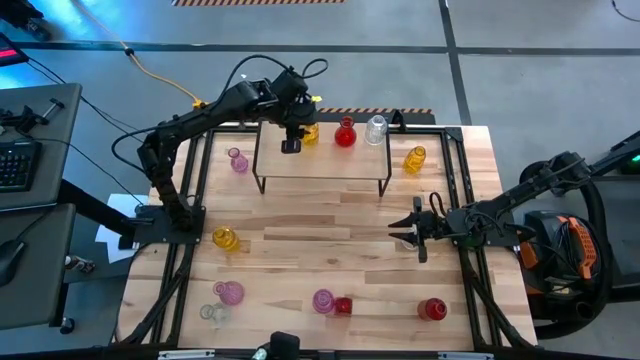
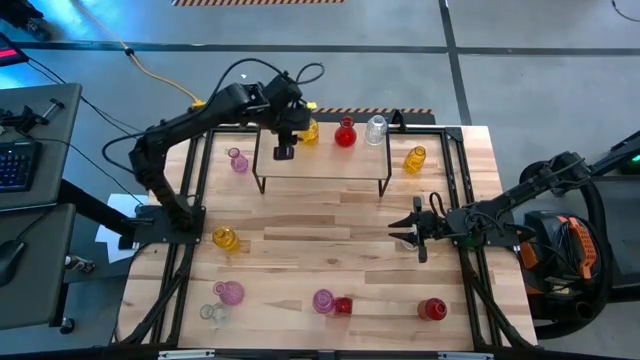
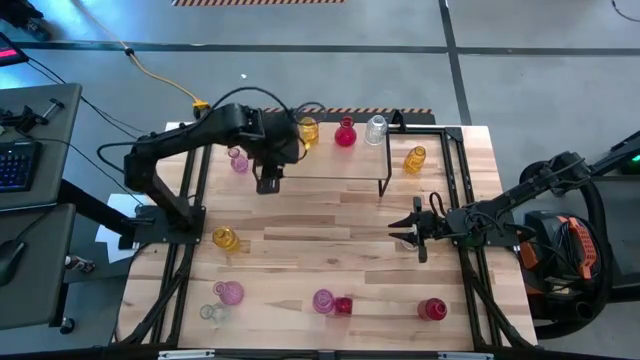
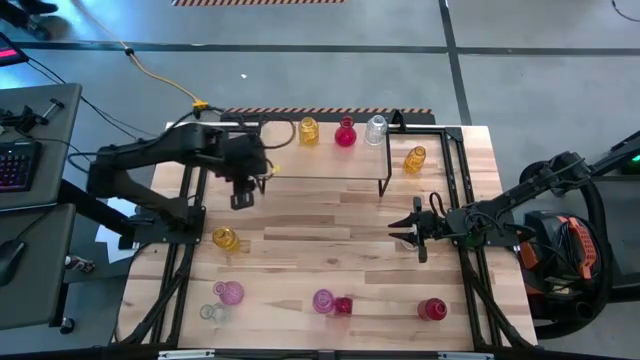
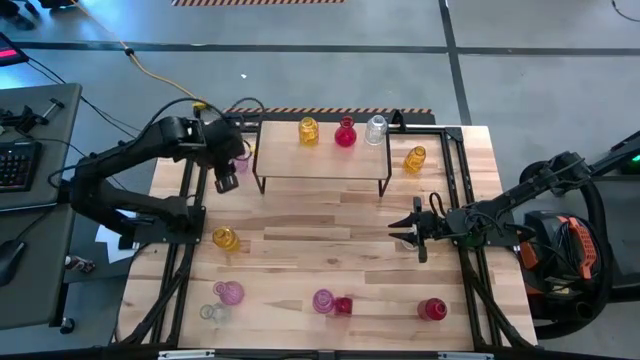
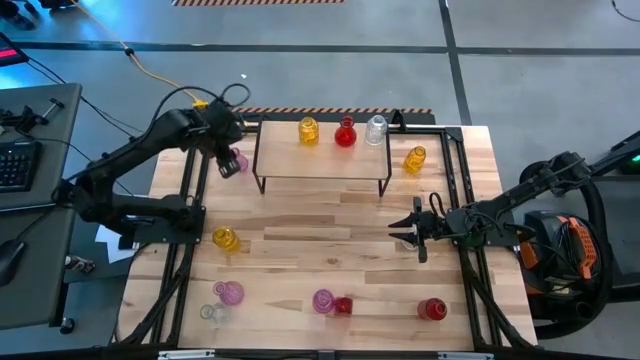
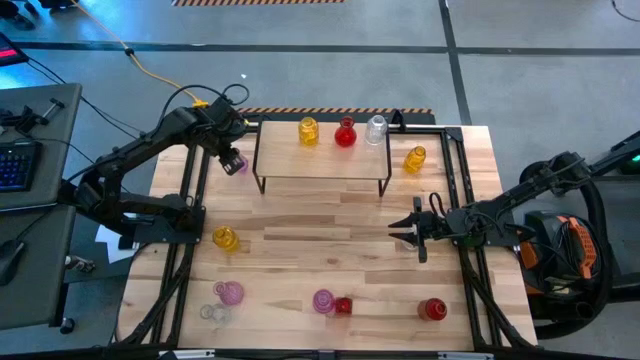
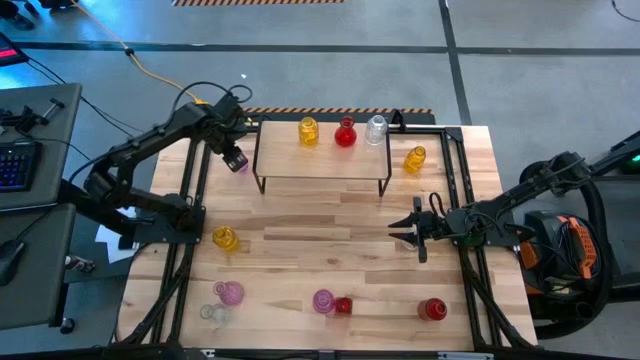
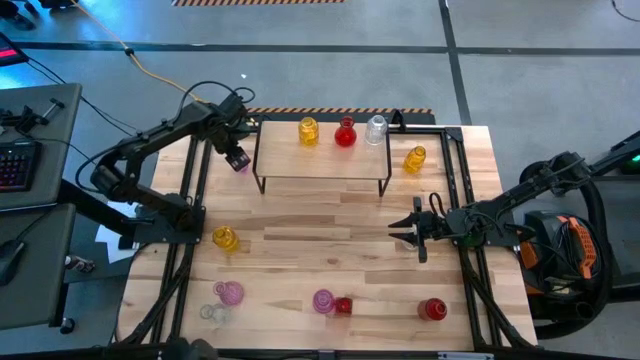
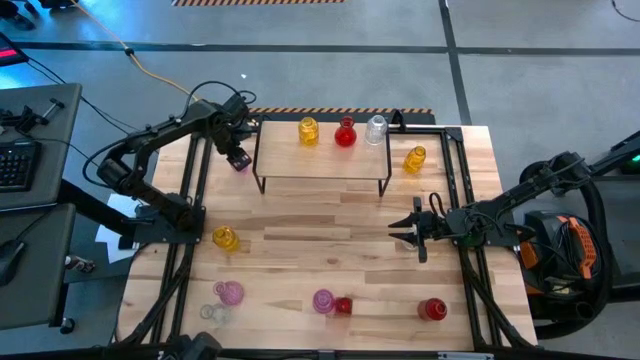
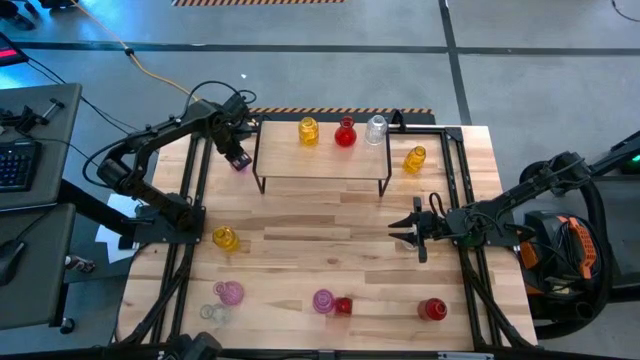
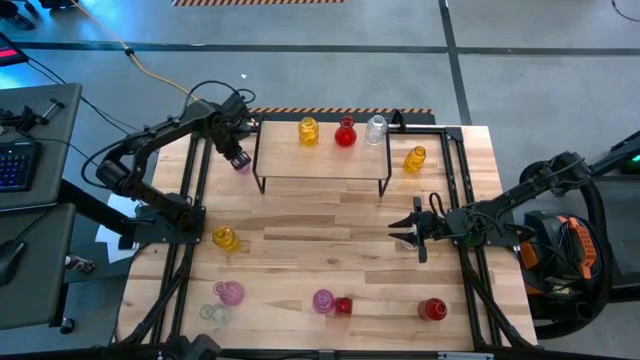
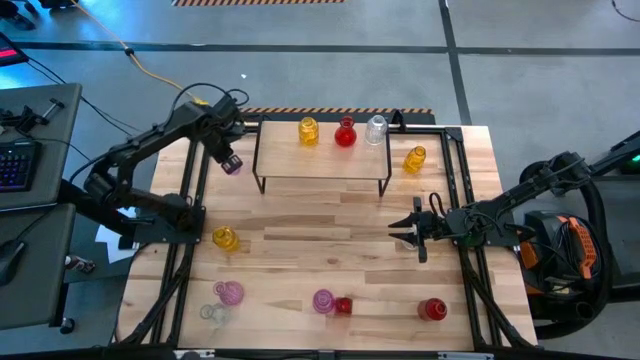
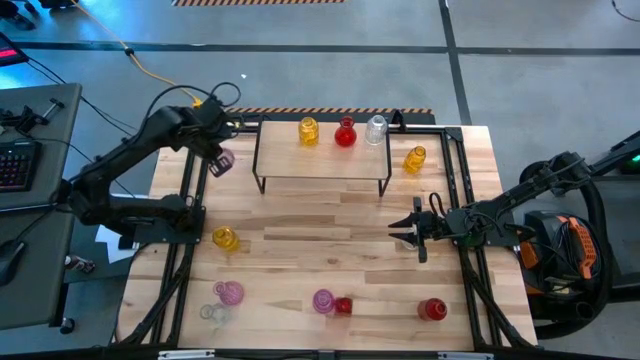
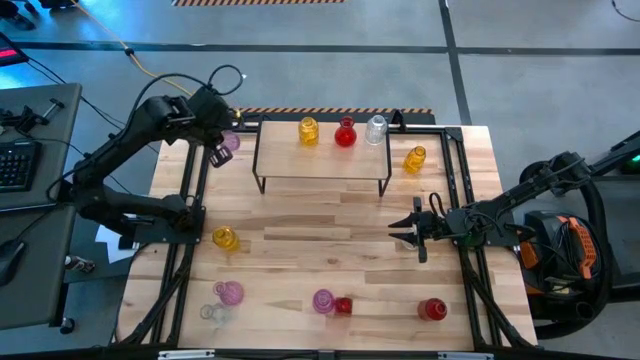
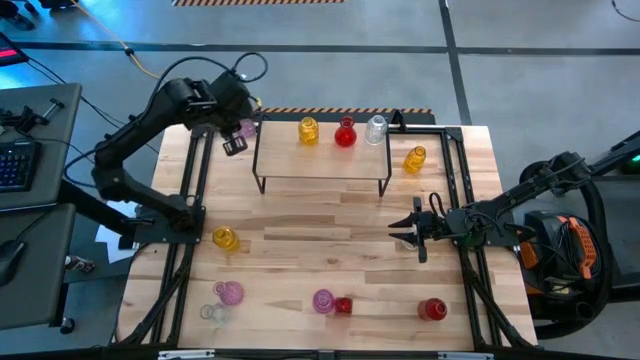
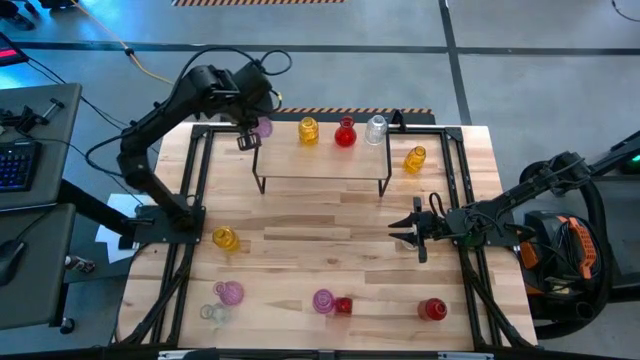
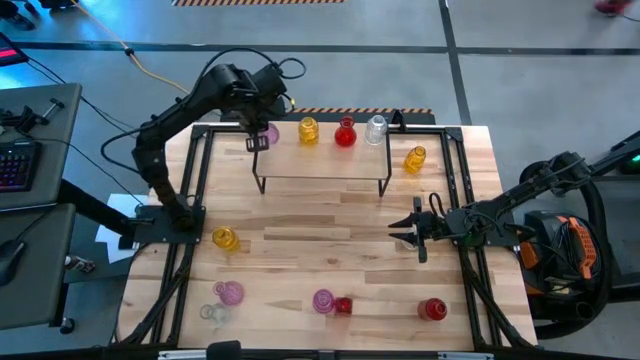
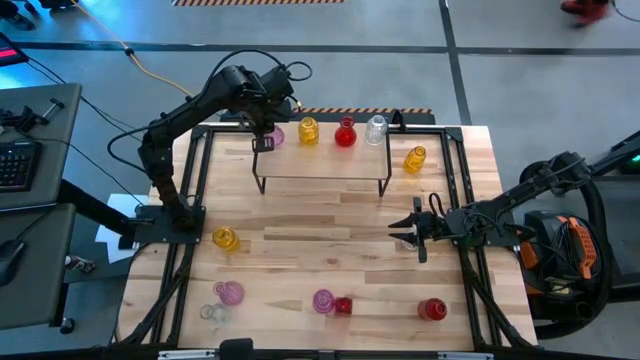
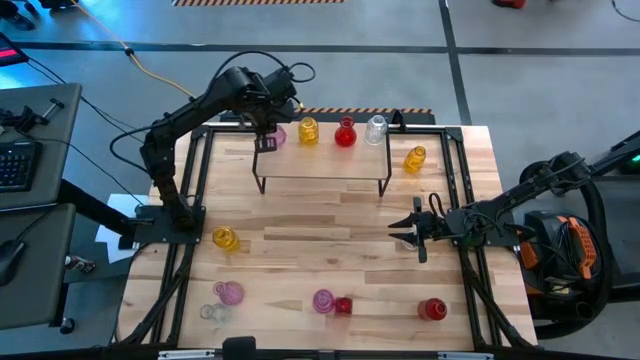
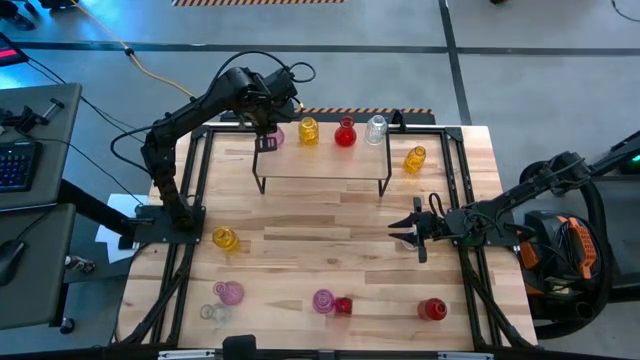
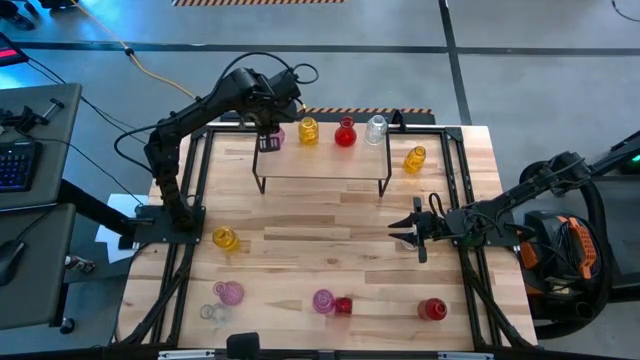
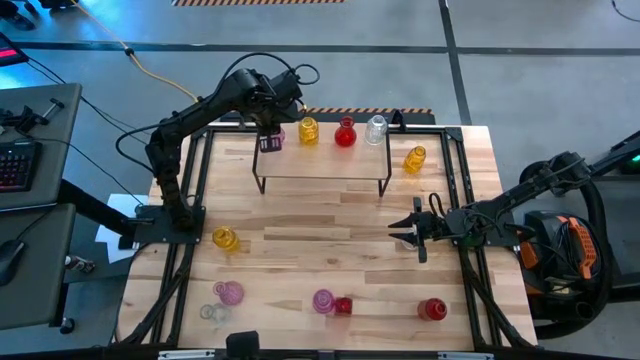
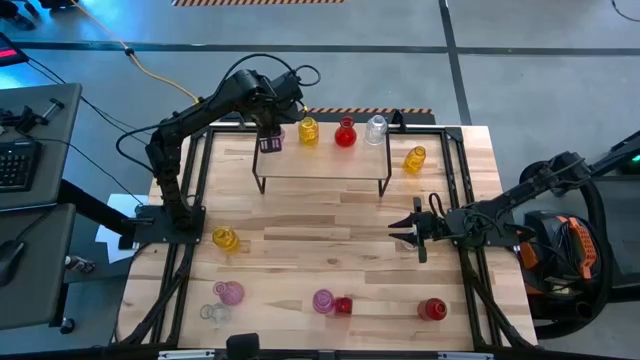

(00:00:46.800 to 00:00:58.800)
Task: sort vases onto shelf
Put the top purple vase on the shelf

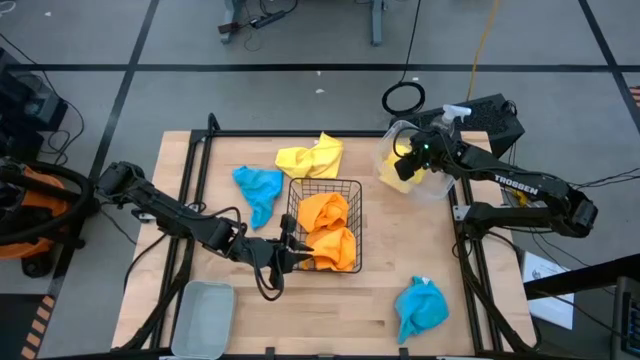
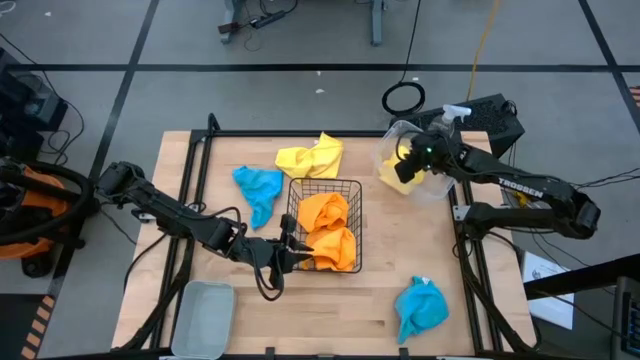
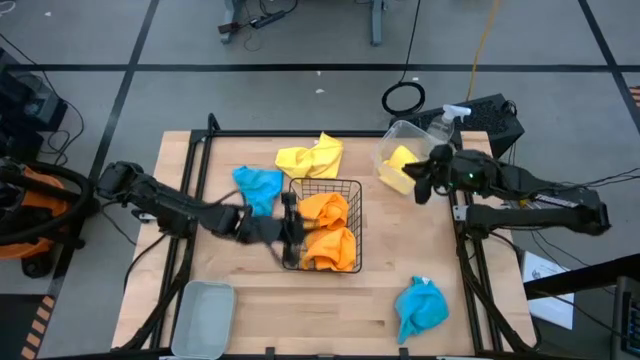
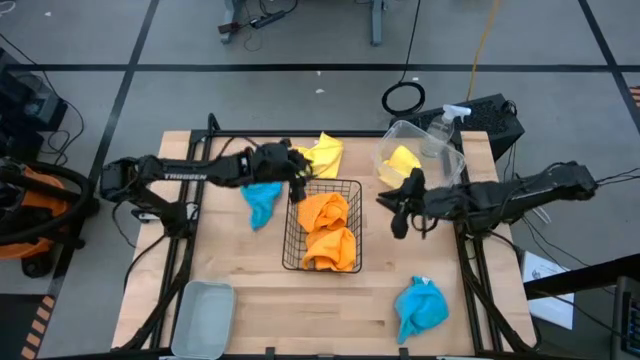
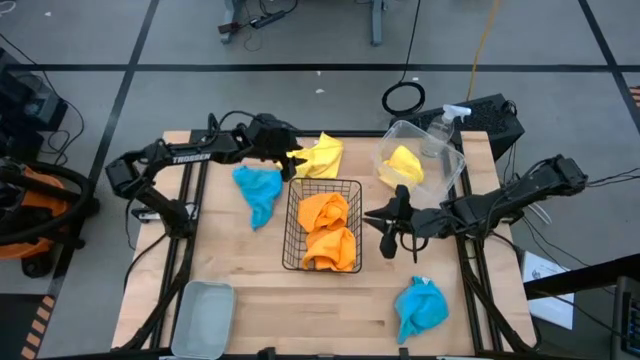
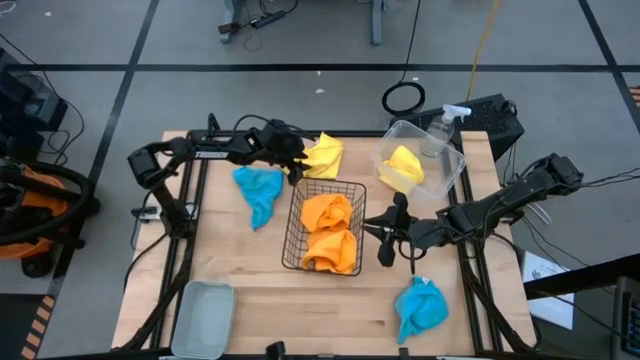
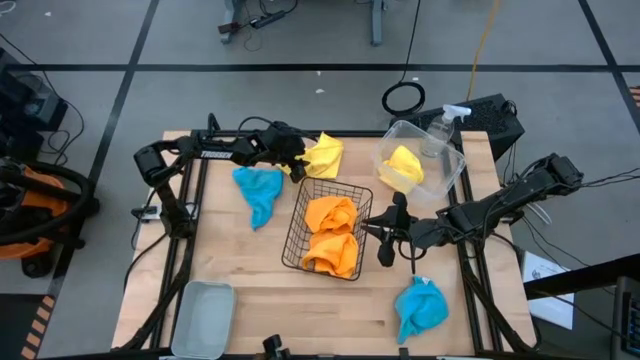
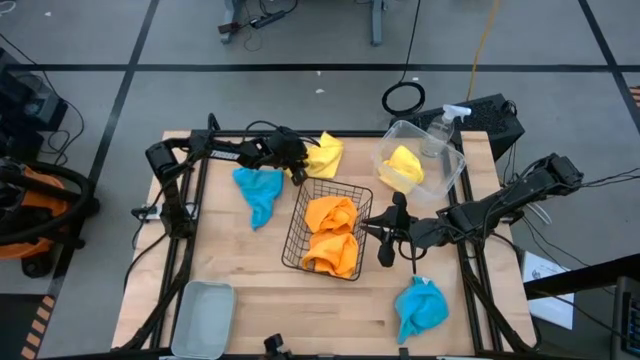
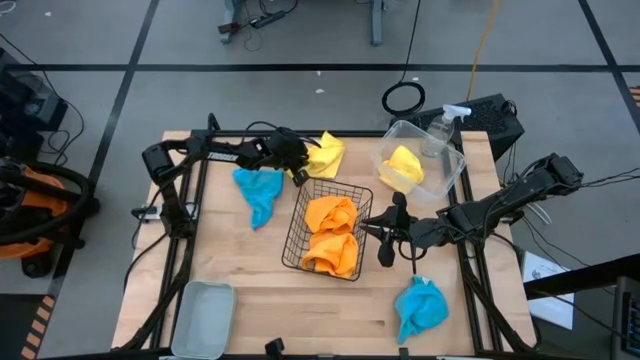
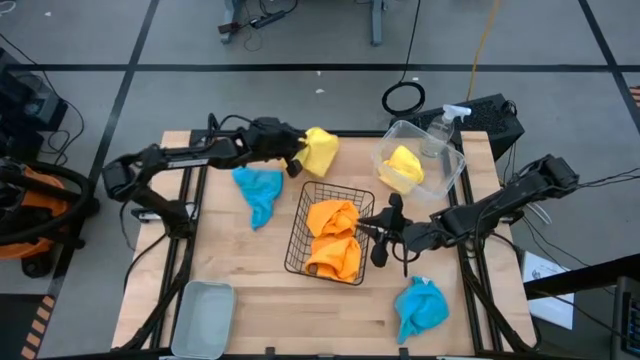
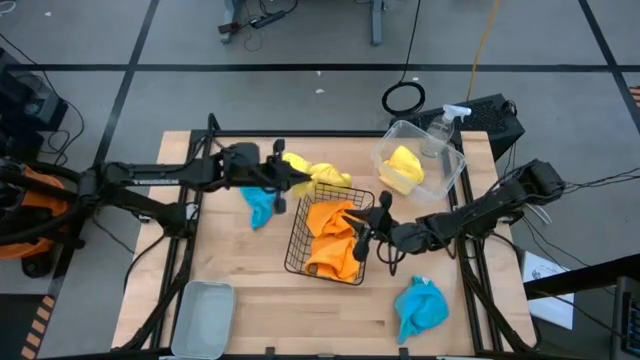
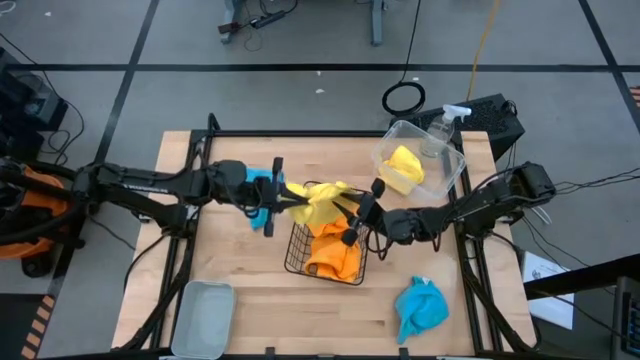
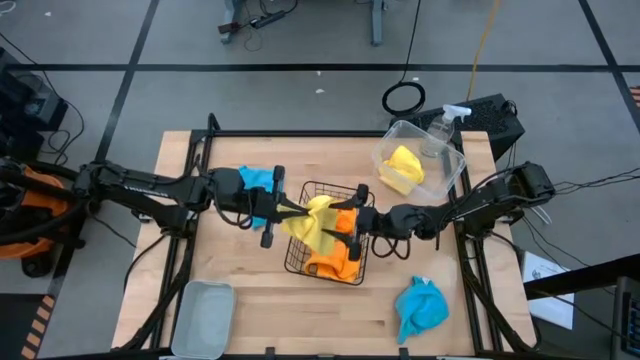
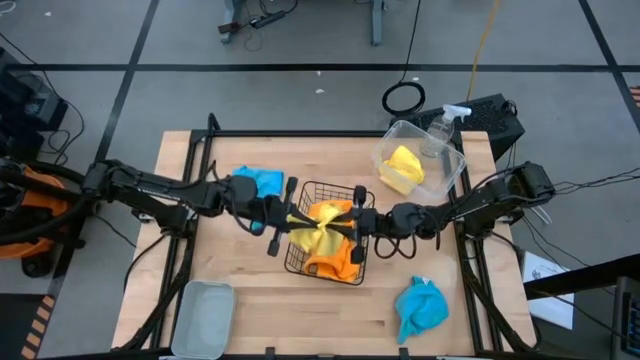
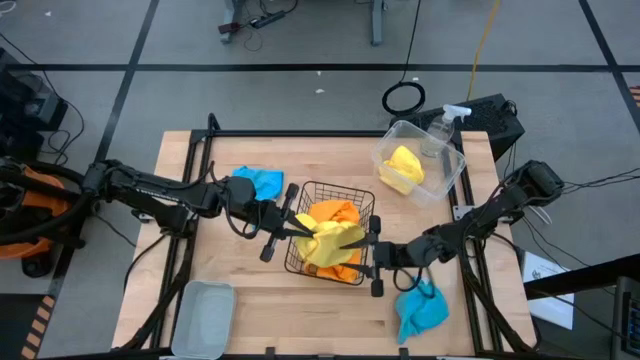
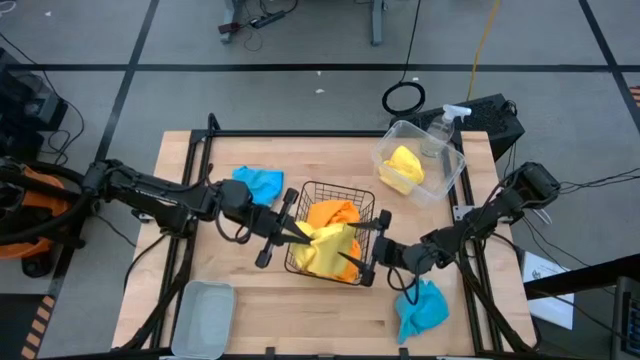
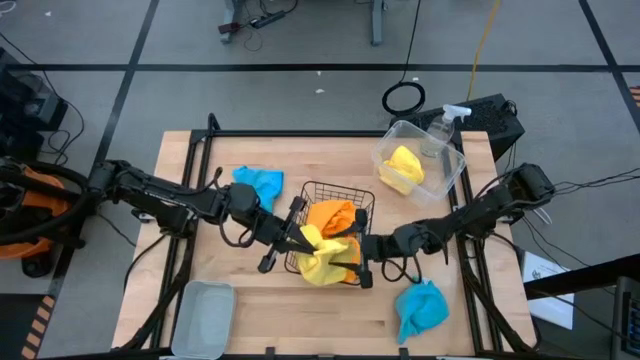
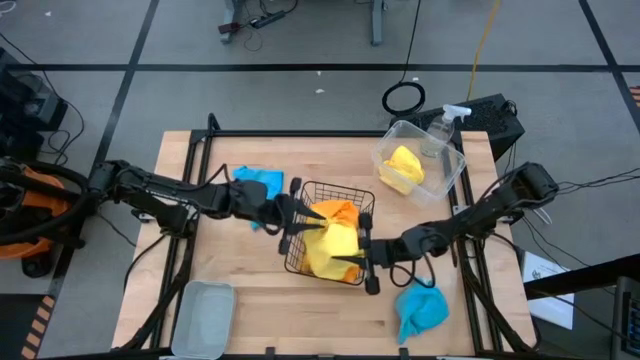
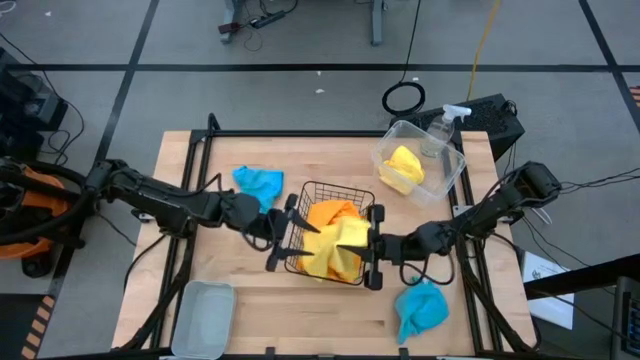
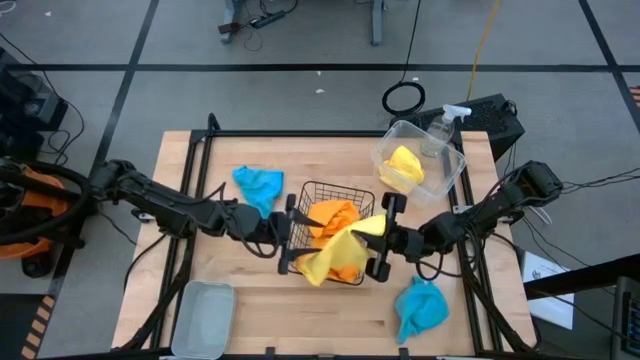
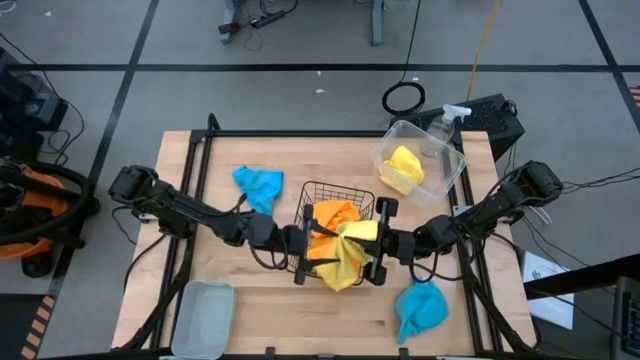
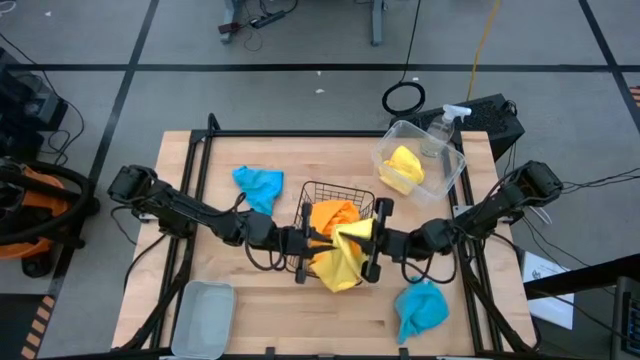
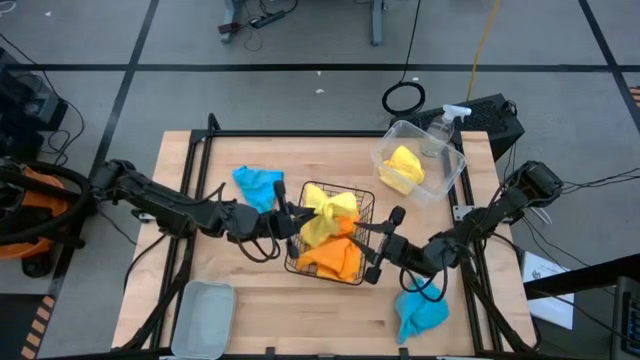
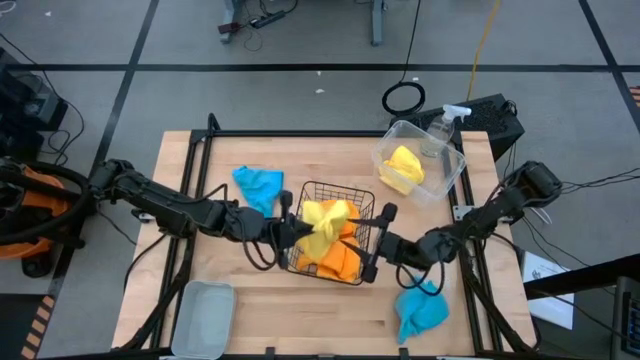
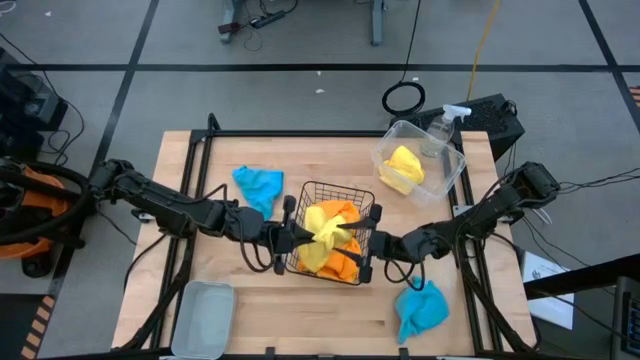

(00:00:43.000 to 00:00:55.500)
Task: Sort microfiber towel by color & place in baskets
Put the yellow microfiber towel into the transparent bin
